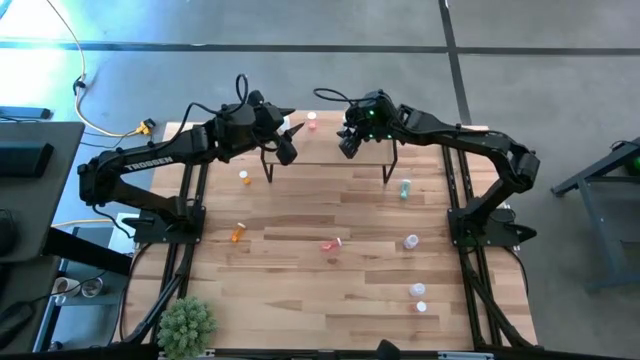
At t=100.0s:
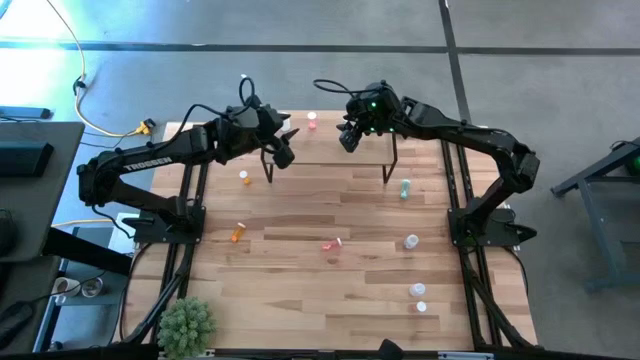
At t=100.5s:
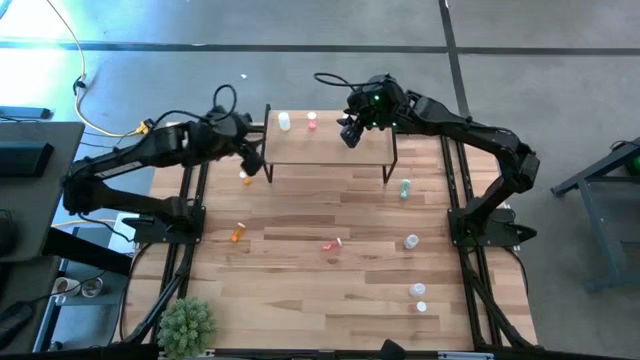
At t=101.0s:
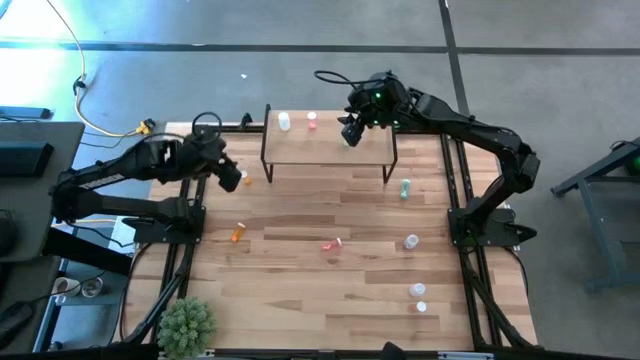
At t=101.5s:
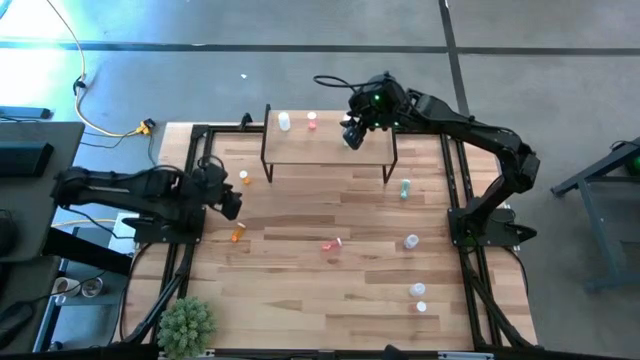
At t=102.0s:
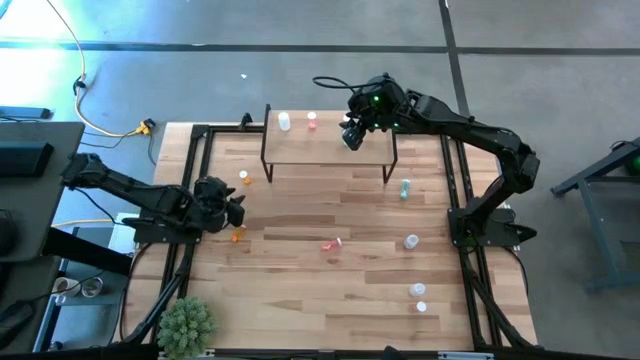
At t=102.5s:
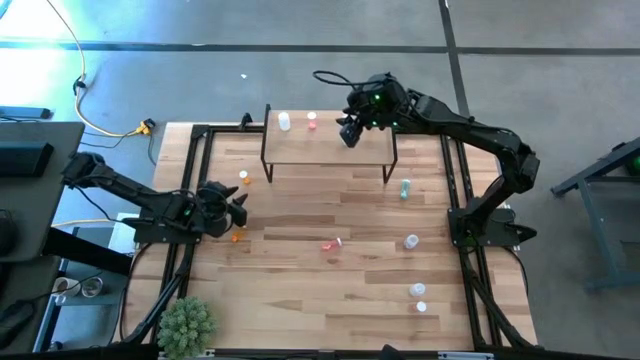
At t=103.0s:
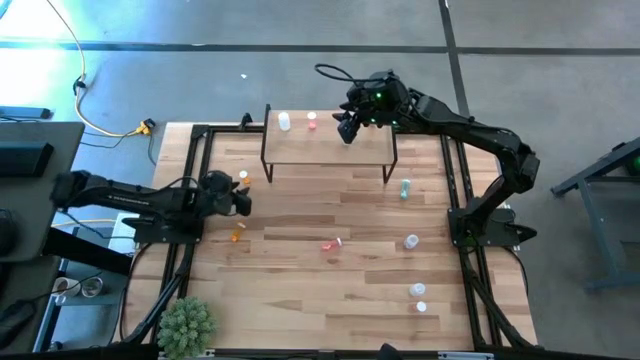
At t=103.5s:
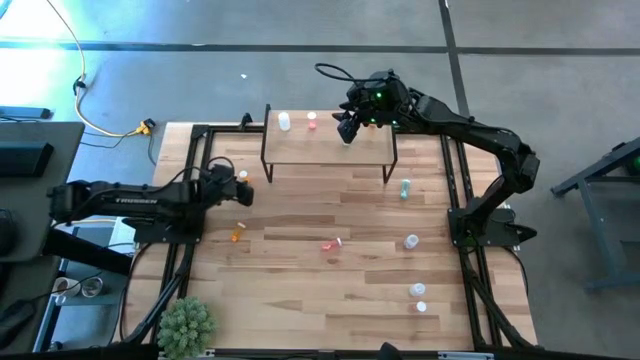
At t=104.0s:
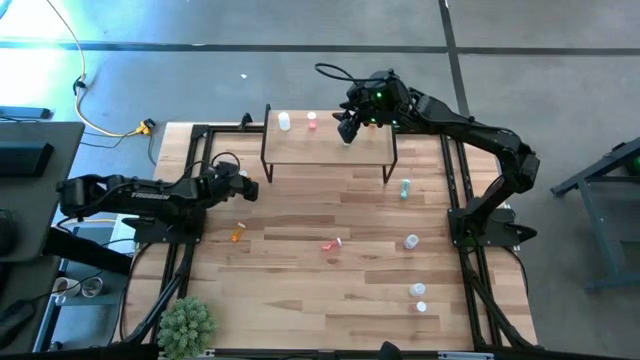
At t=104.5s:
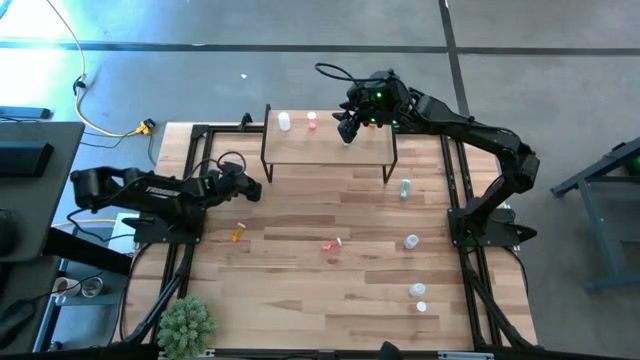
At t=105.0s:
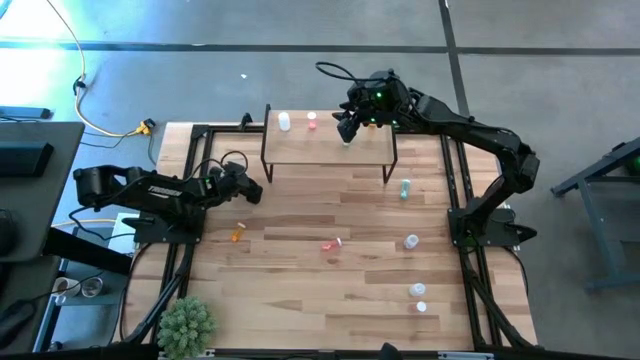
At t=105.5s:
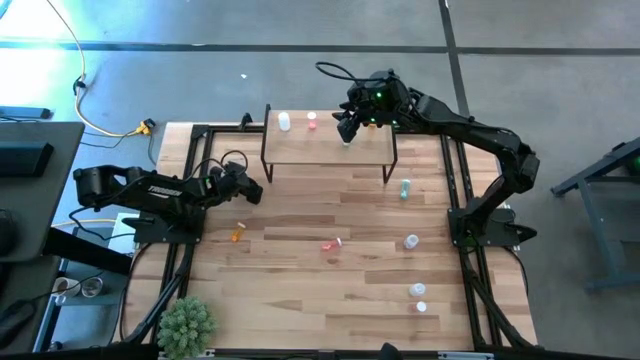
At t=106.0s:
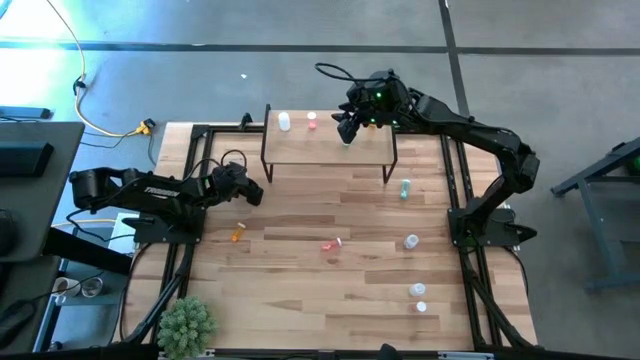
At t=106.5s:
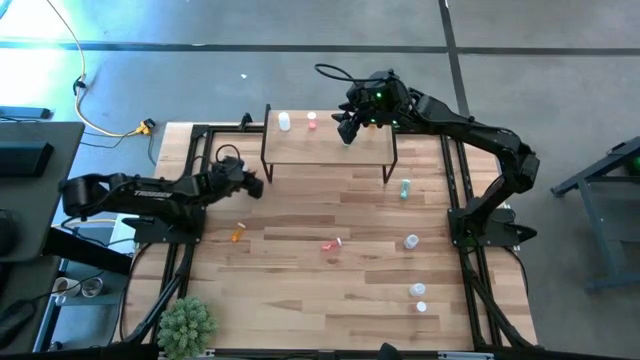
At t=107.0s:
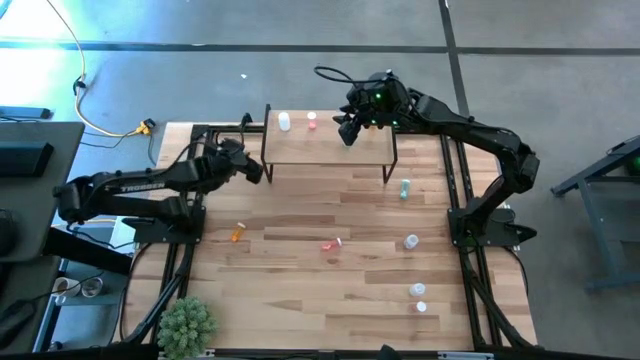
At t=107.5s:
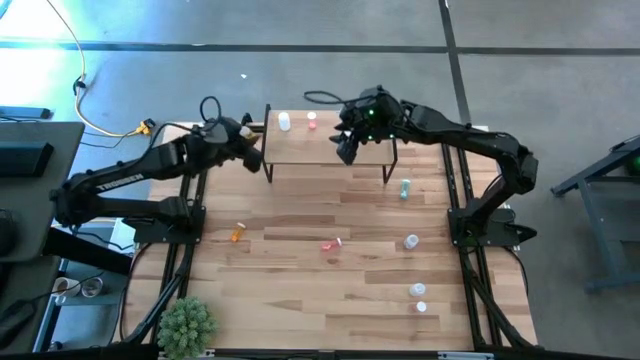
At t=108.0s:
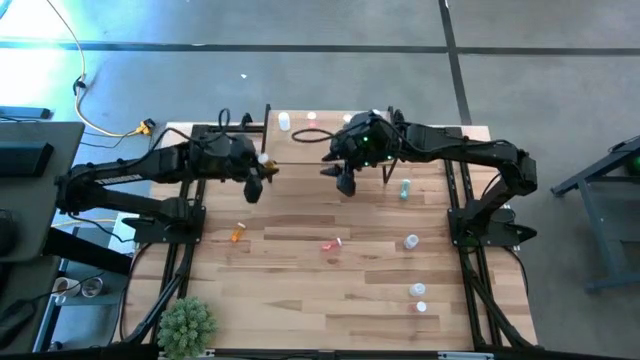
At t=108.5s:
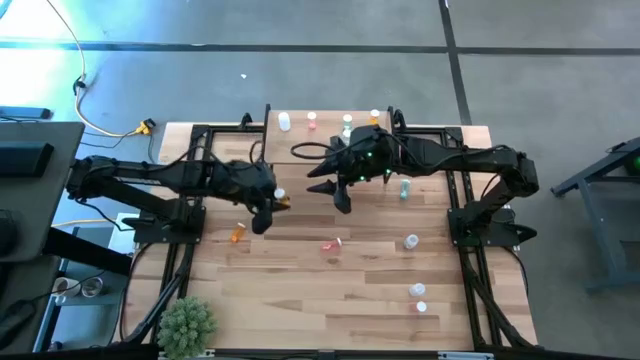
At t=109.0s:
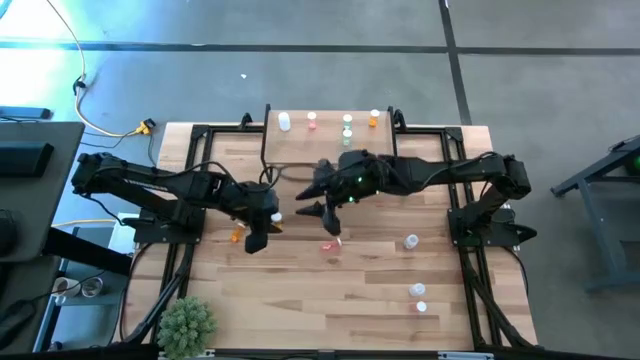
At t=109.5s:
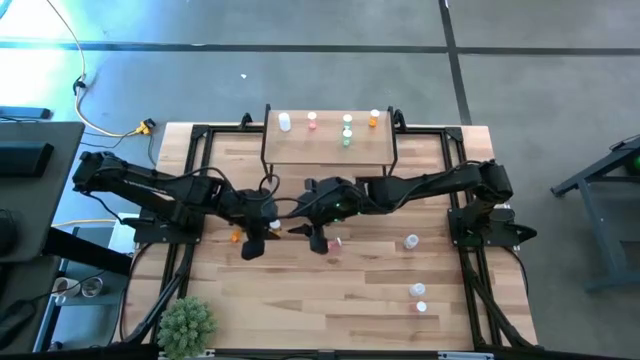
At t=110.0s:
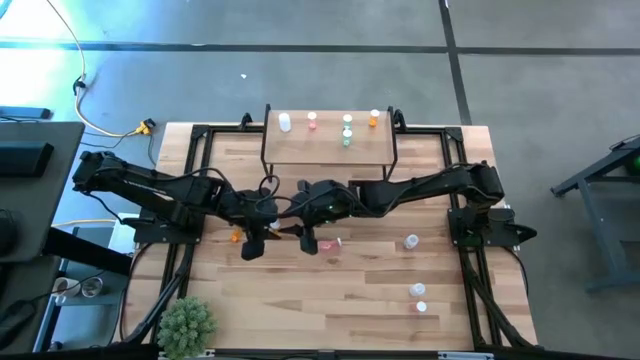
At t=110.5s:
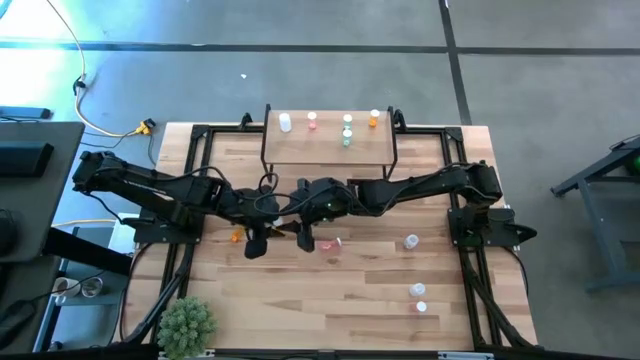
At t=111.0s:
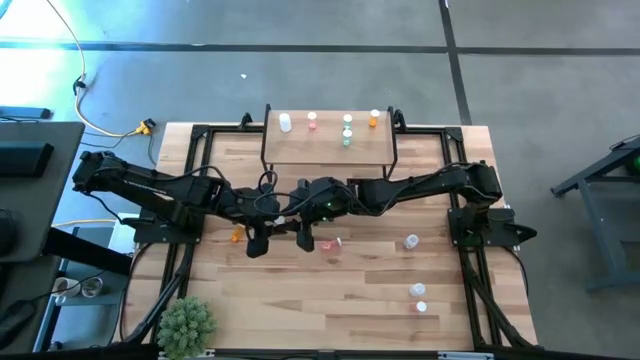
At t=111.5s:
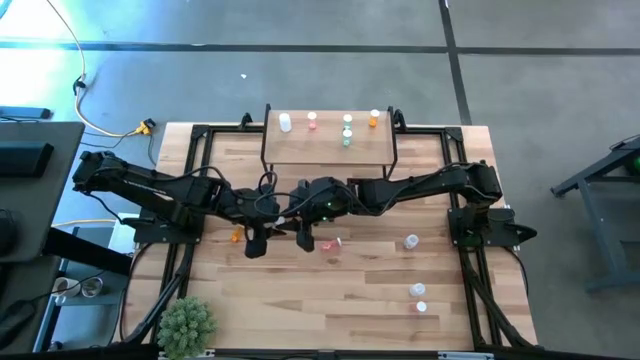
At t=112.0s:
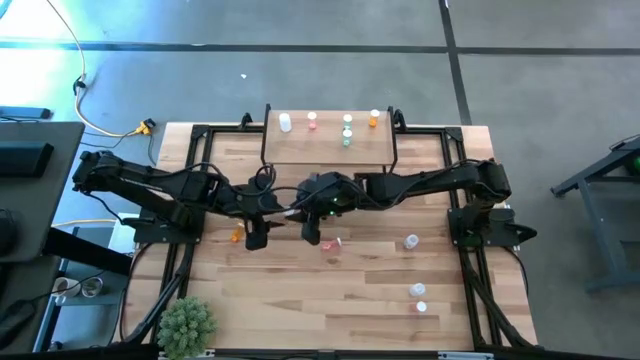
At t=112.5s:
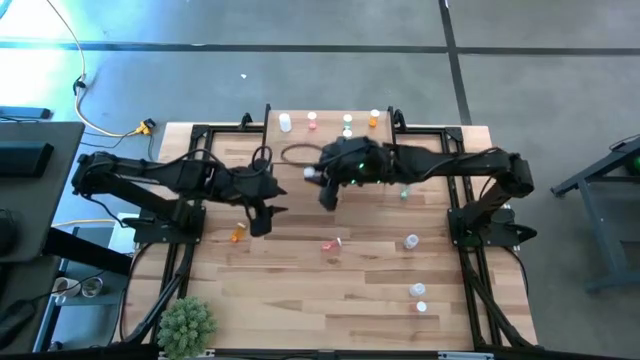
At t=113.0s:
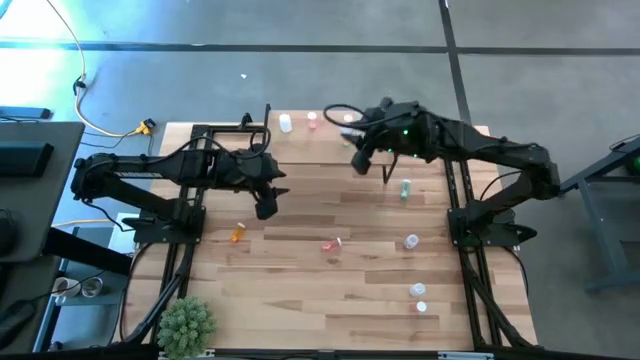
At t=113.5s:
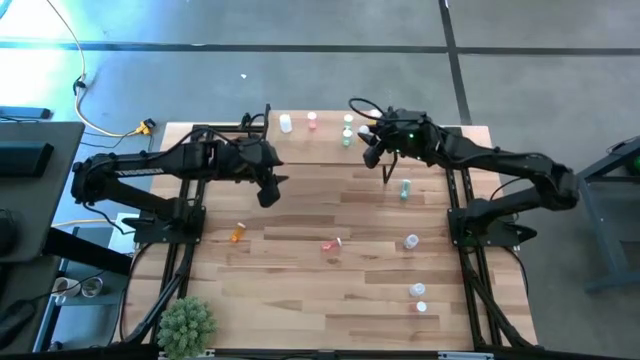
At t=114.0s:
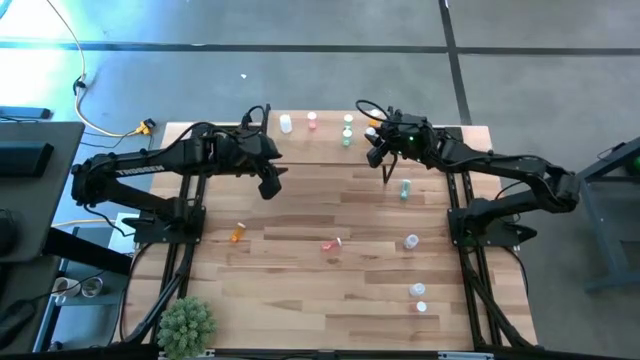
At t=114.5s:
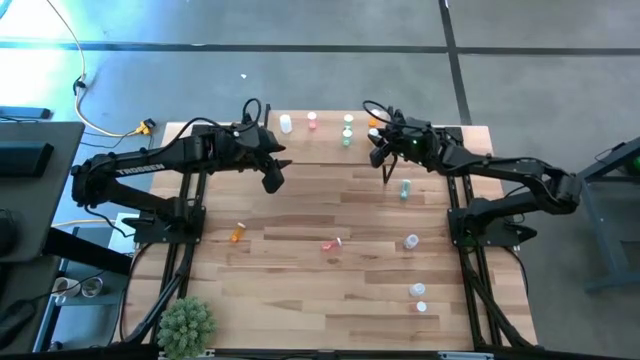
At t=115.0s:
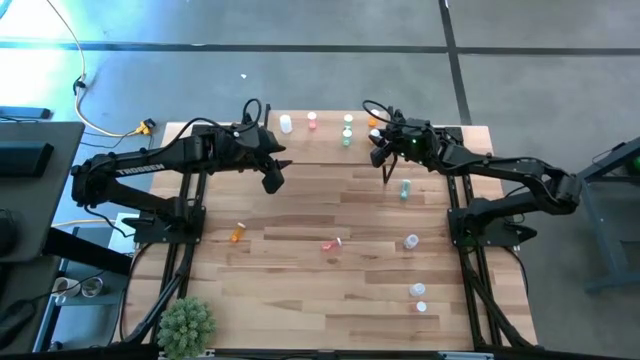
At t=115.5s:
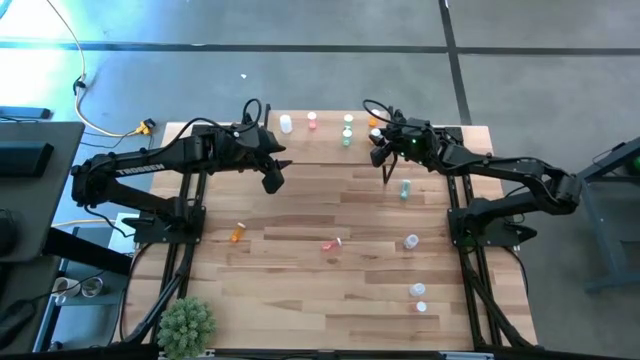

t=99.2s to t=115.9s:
Task: Pick and place medicine bottles onto shelf by color
Put the top yellow pill bottle on the shelf aligned with the other yellow pill bottle

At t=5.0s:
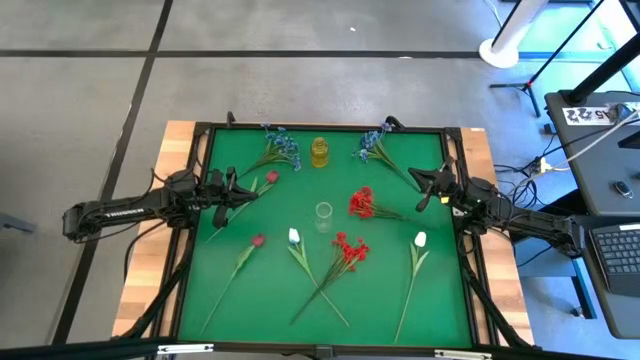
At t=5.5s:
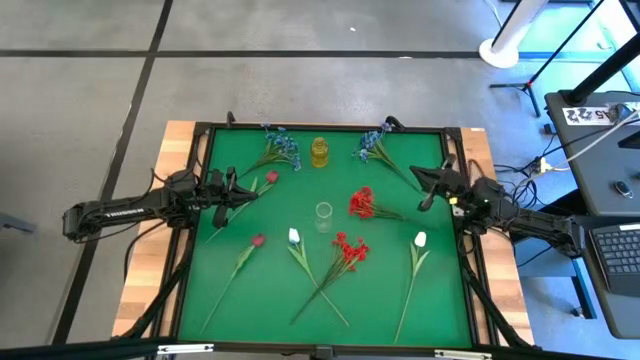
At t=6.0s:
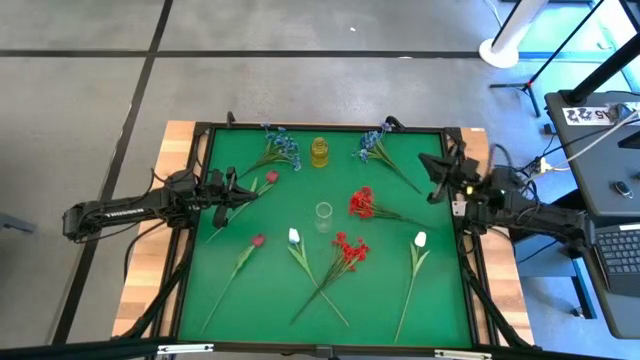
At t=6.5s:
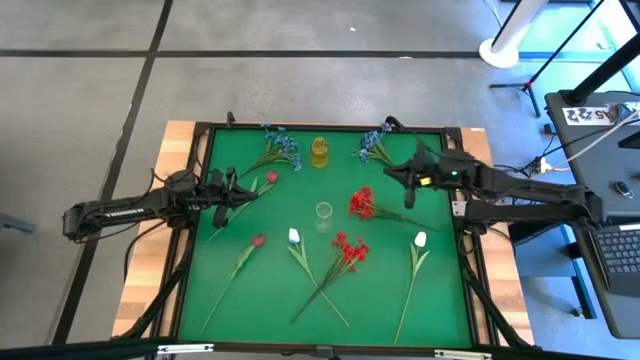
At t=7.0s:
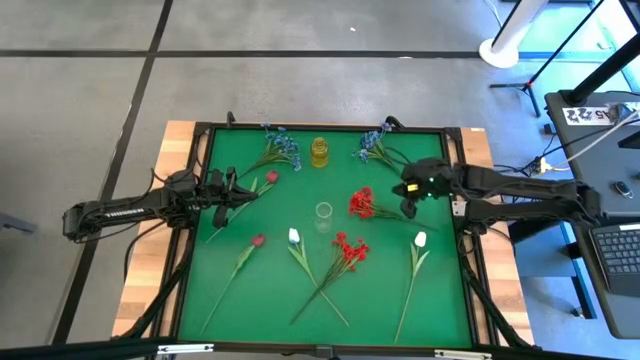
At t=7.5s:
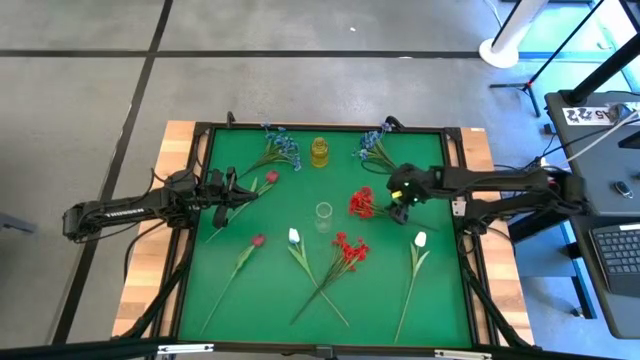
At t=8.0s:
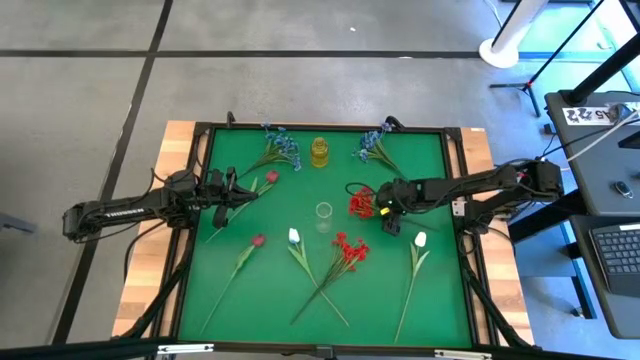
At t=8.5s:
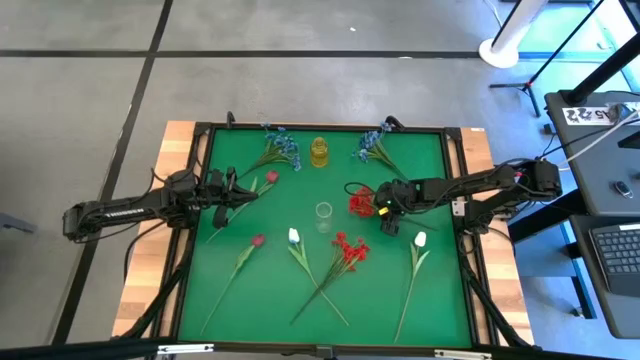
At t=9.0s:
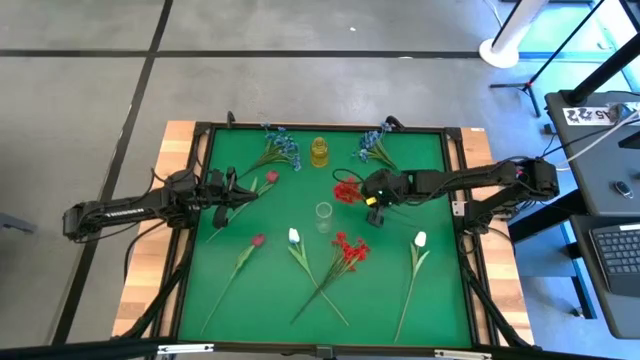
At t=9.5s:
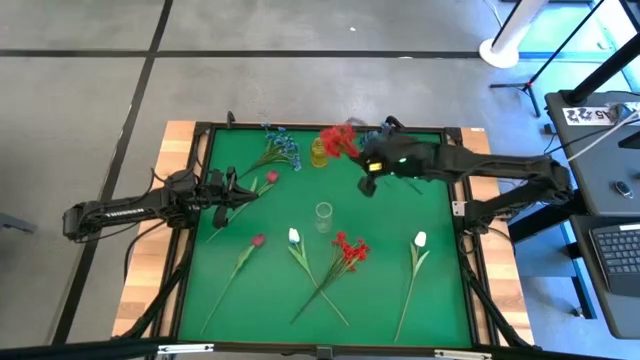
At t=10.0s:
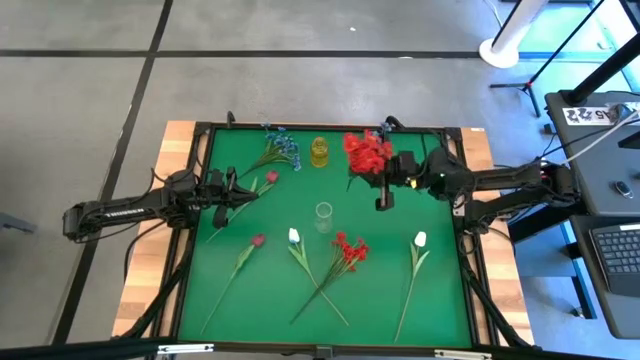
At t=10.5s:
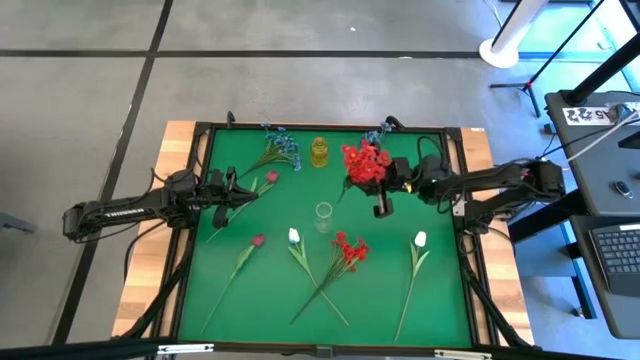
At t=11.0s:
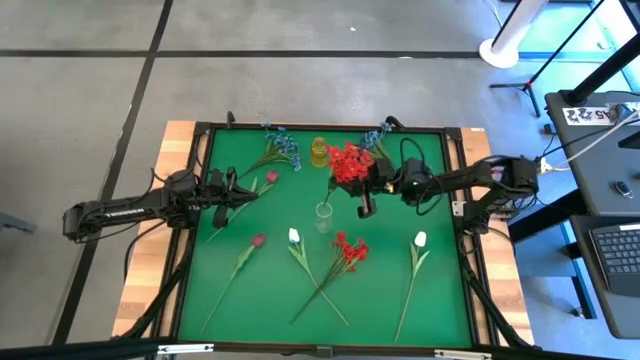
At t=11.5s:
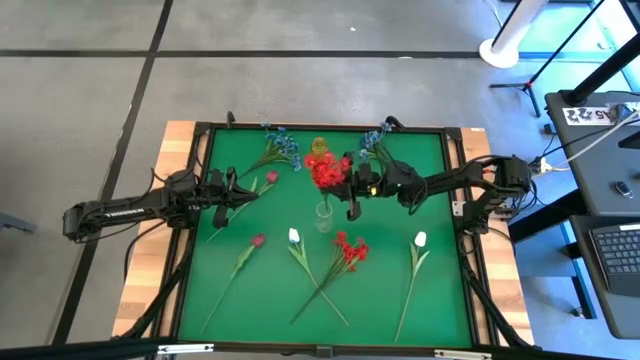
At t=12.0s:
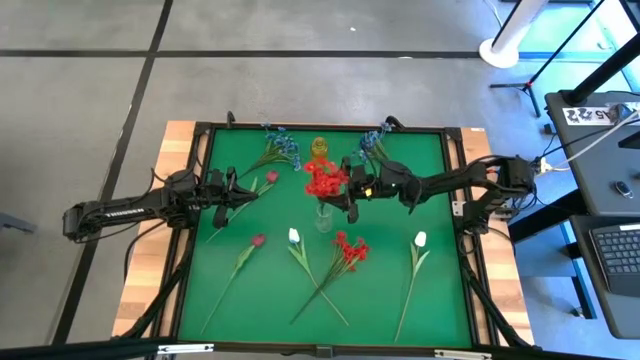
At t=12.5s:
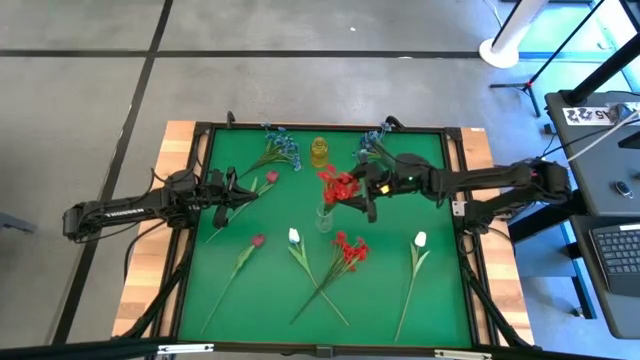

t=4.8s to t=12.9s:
Task: Sort flowers into vase by color
Put the top red flowers into the transparent vase
